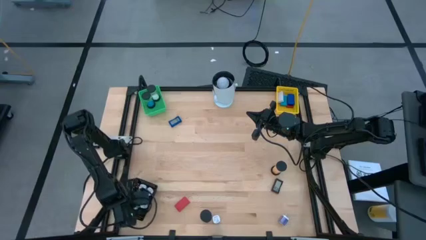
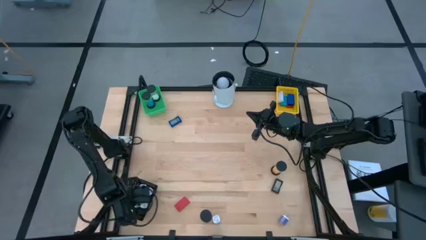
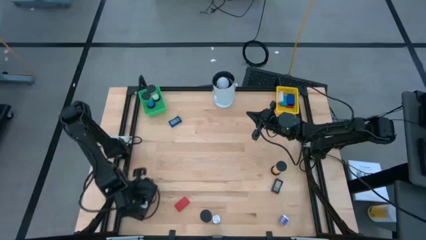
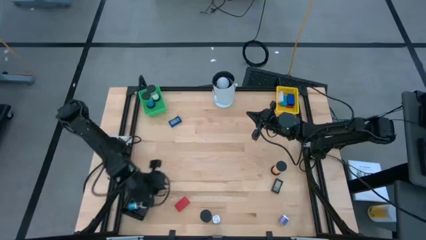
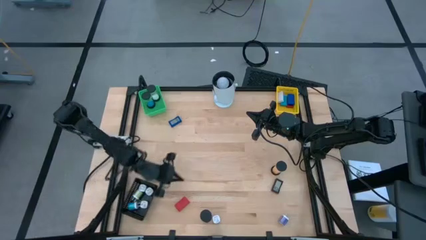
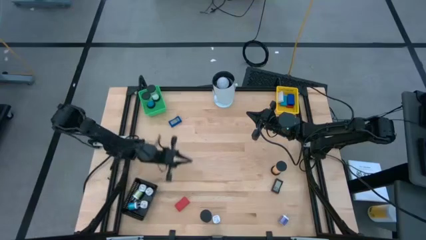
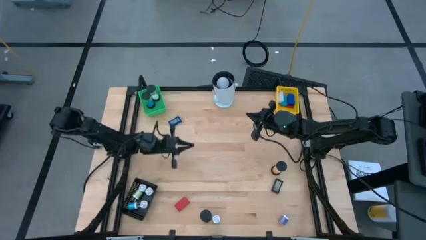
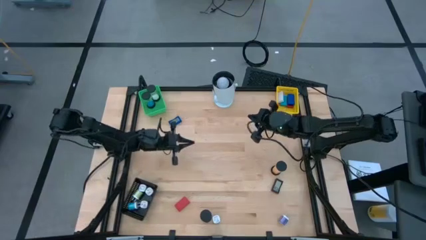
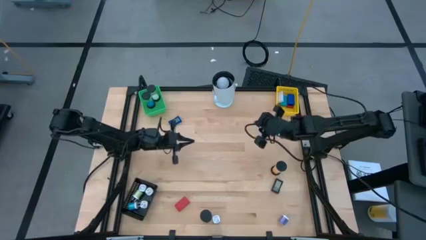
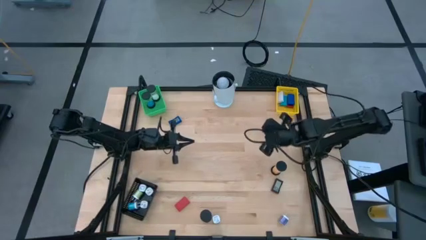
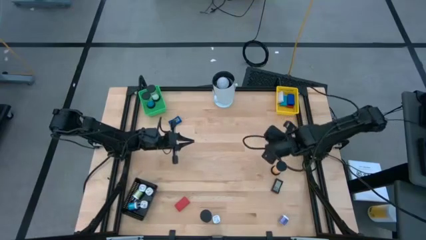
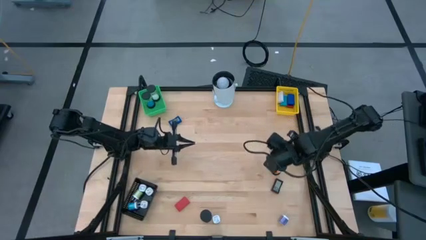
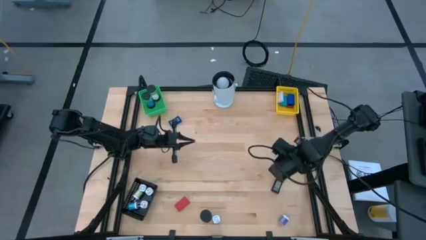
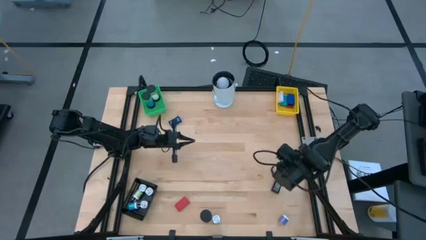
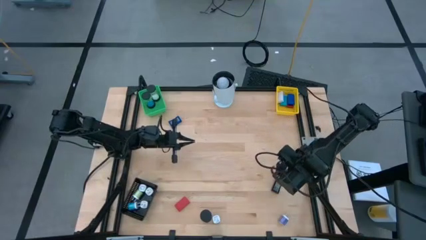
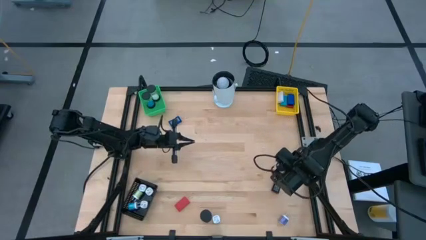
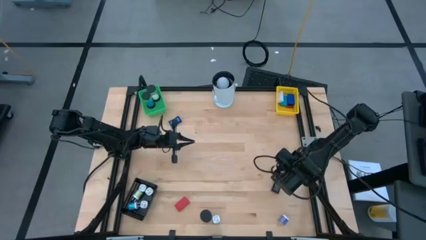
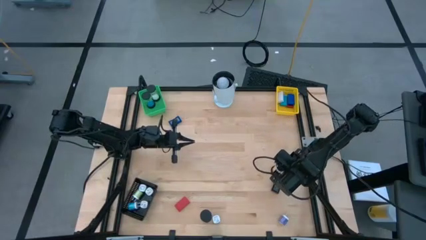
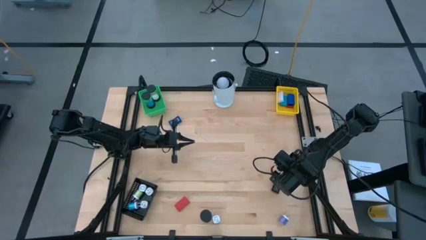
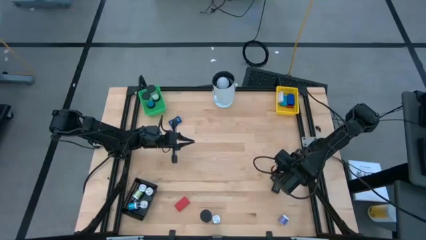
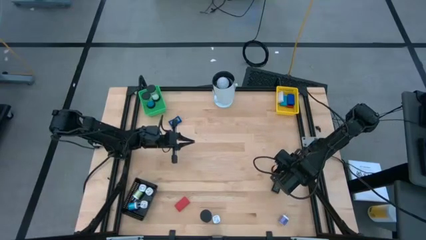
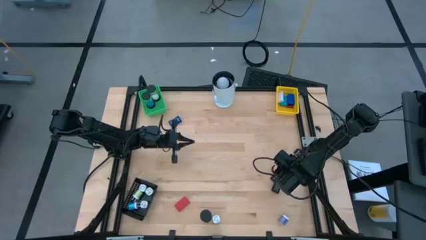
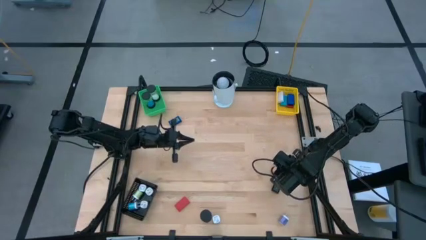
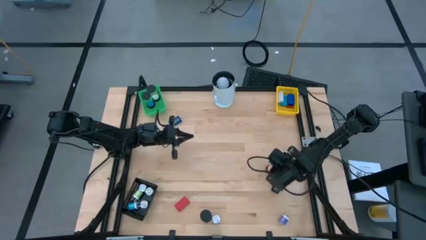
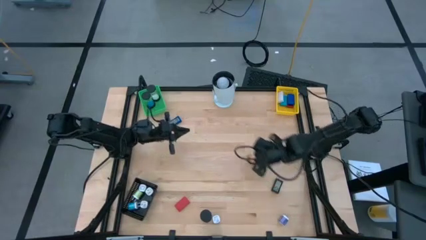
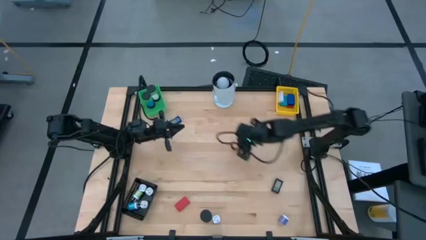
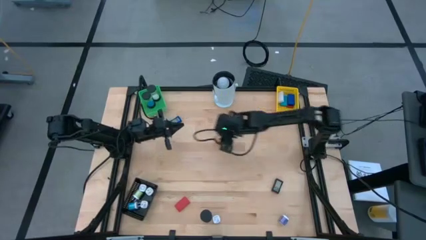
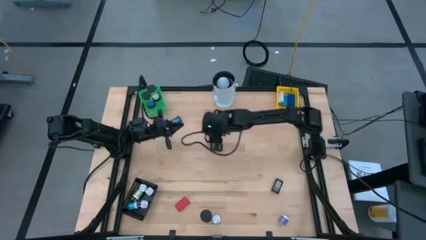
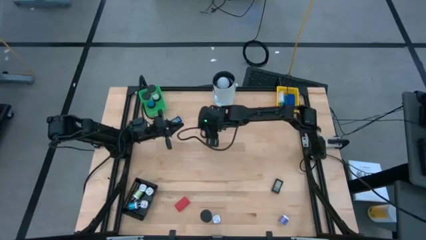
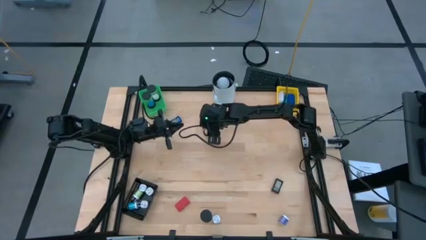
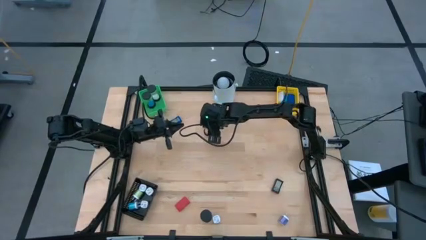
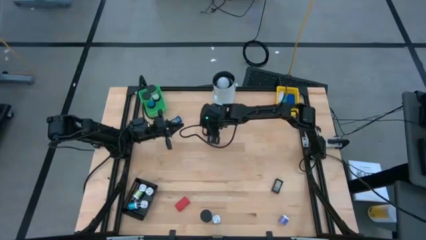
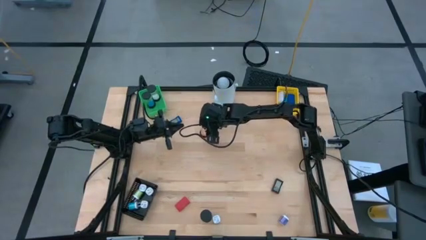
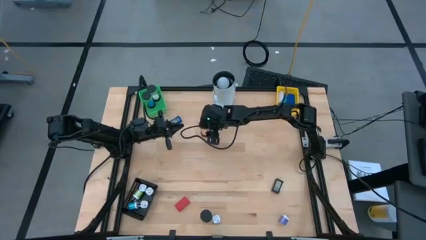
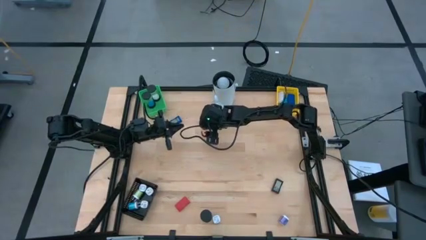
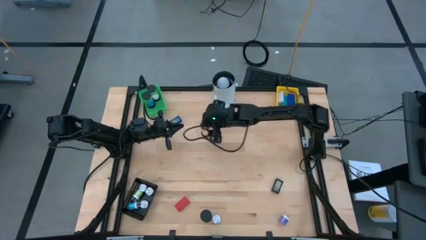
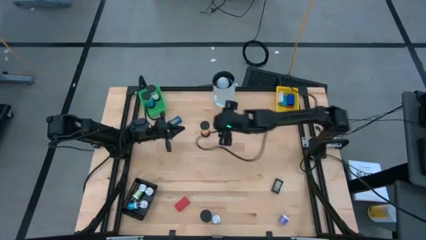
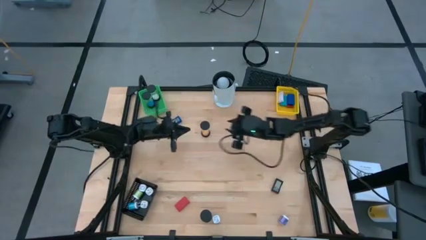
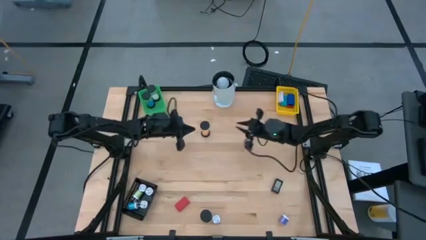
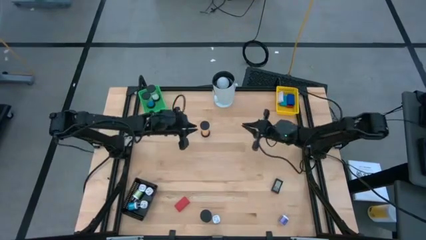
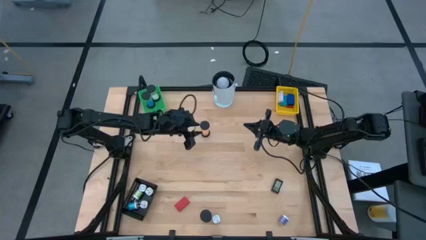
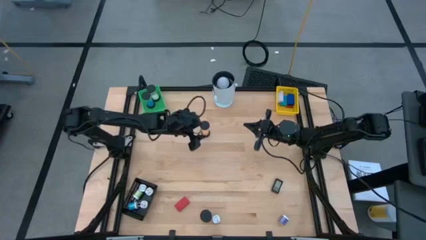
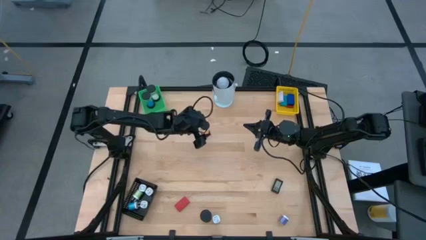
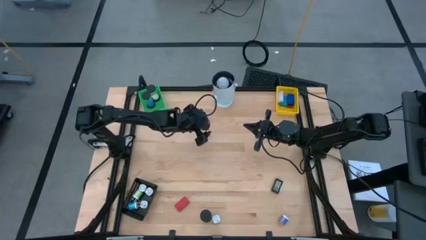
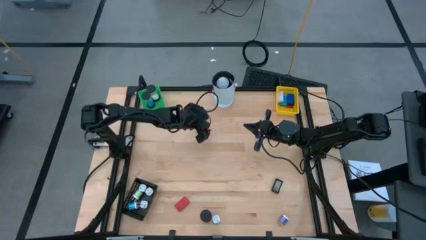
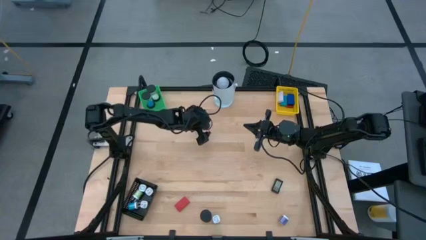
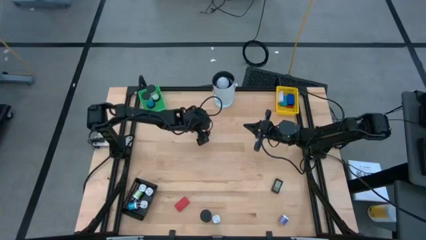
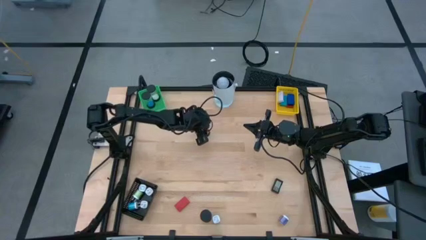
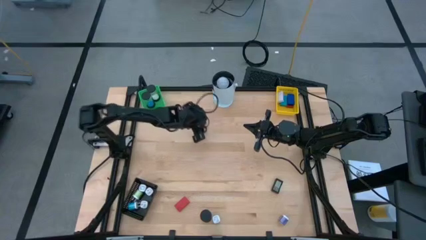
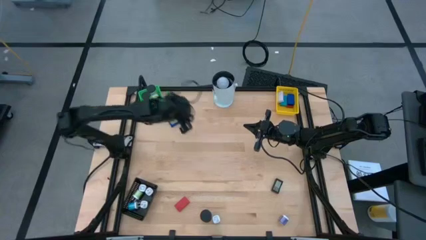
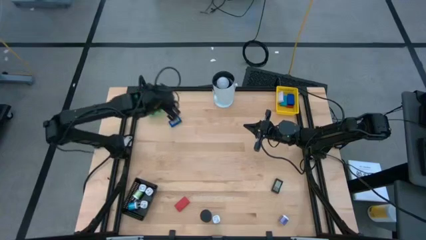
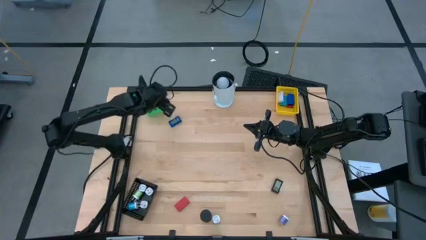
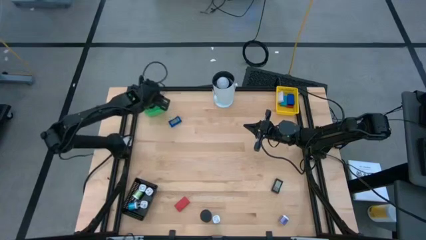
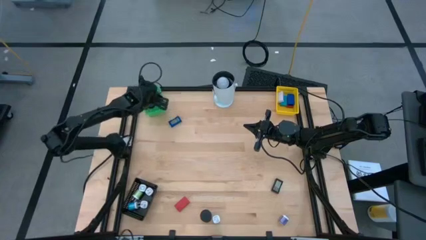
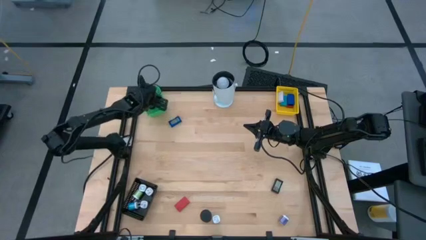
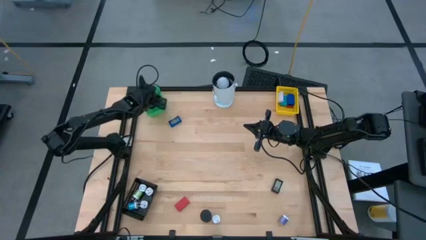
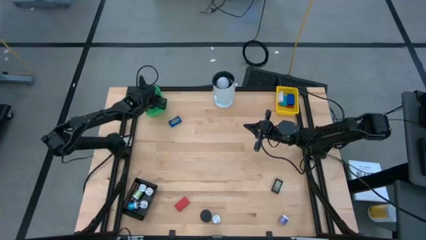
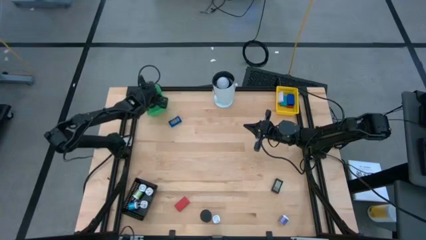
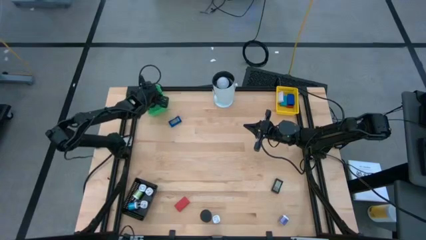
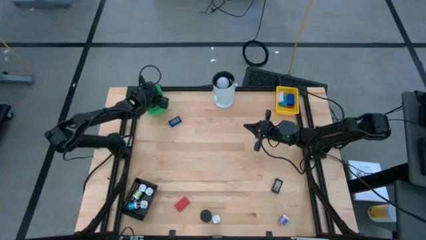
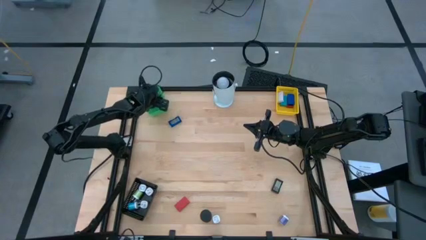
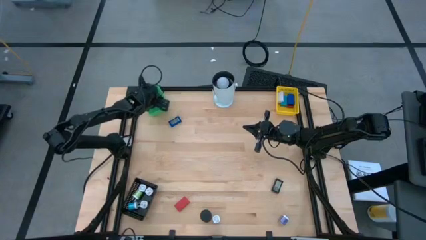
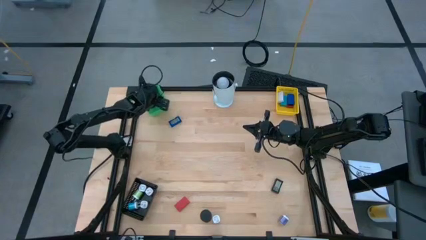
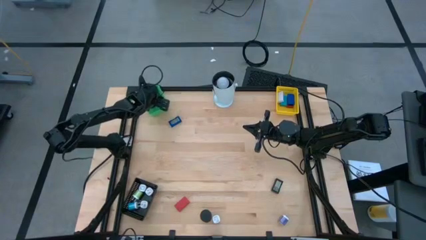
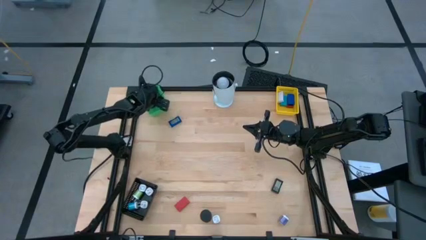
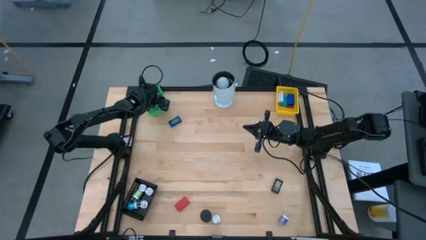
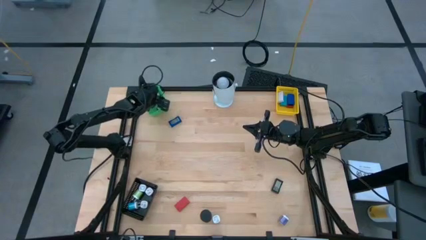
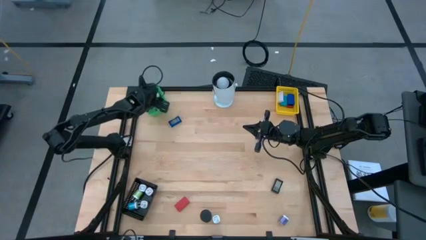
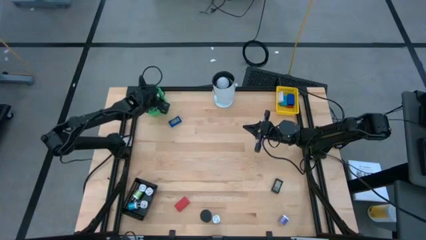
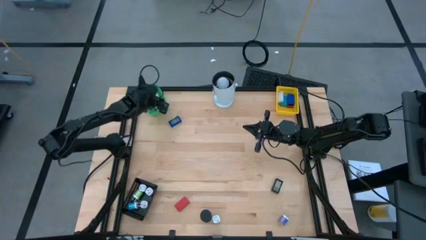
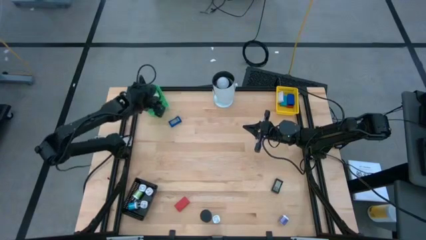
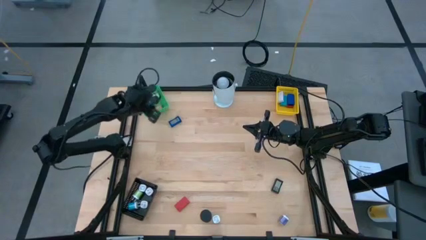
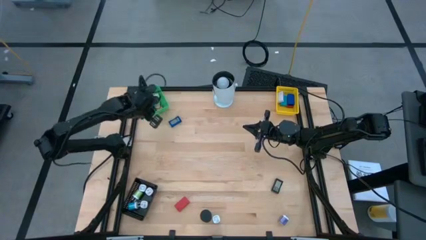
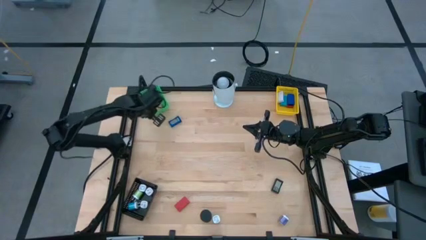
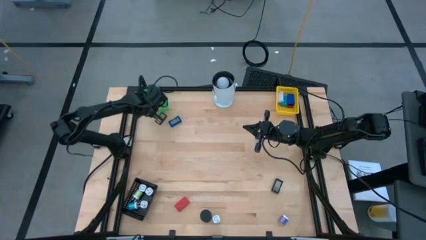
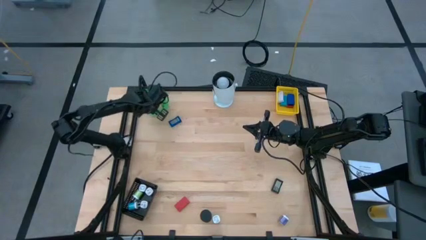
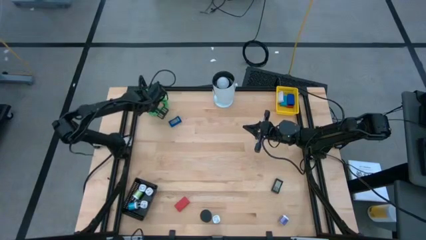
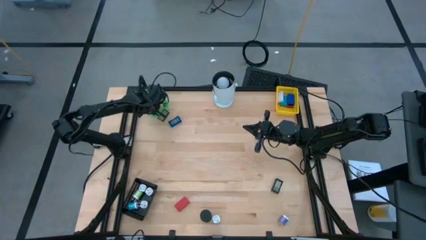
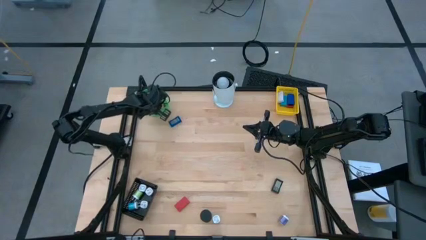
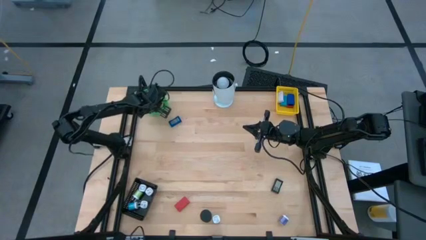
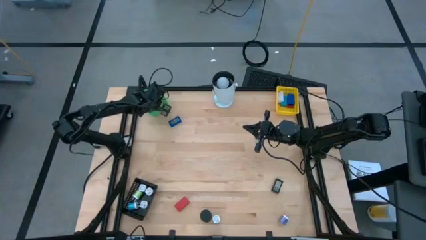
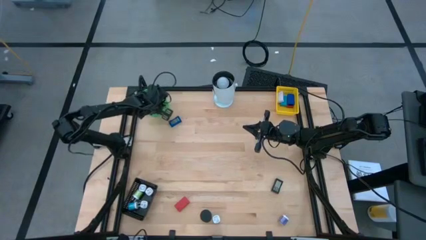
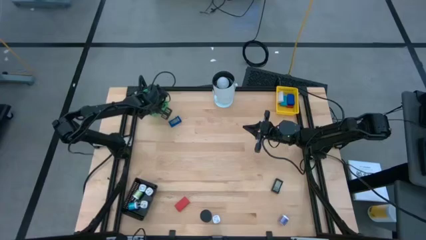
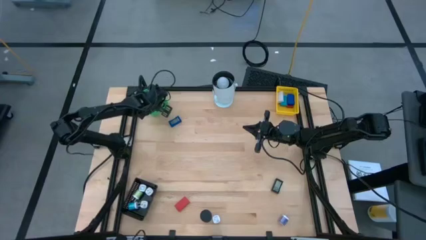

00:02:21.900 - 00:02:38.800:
Task: Pick & Place Office items
Put the orange hourglass timer into the green bin
